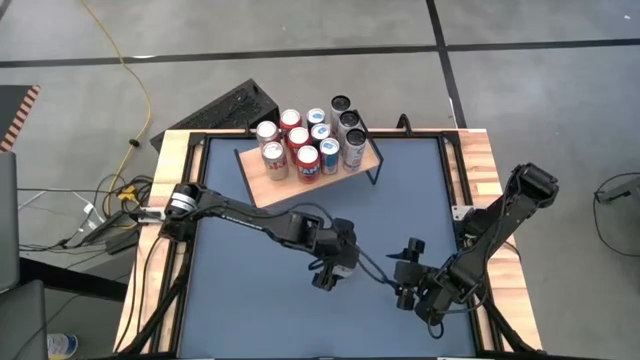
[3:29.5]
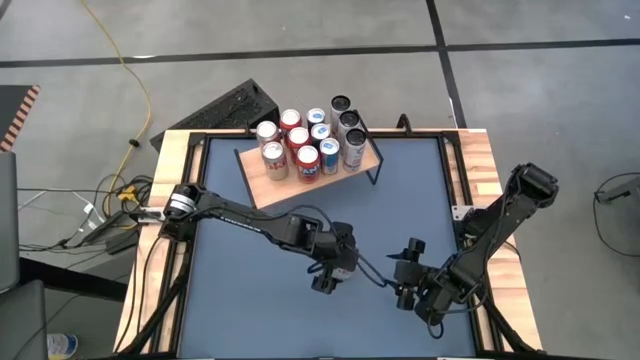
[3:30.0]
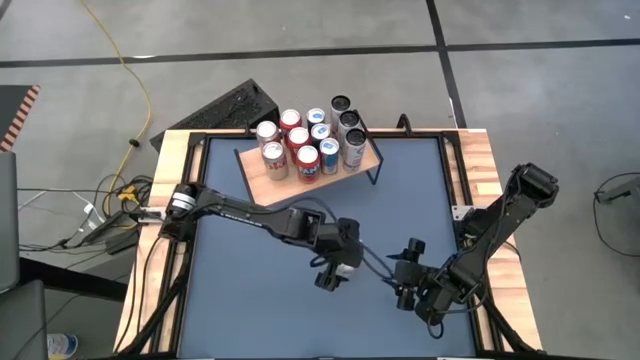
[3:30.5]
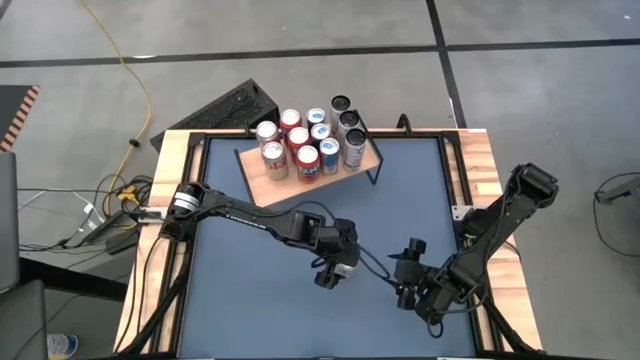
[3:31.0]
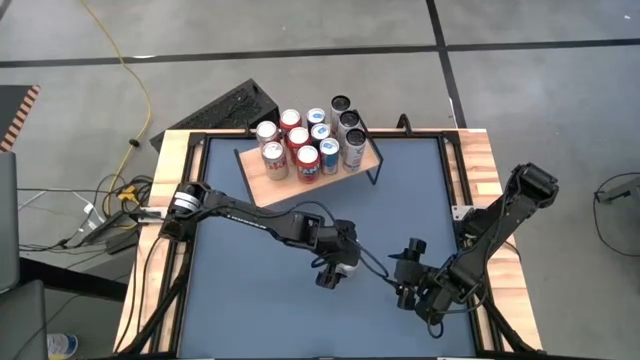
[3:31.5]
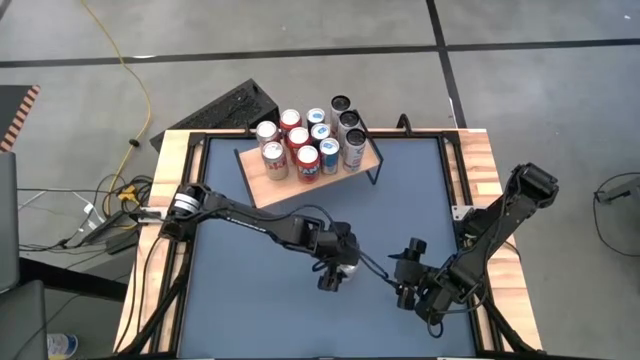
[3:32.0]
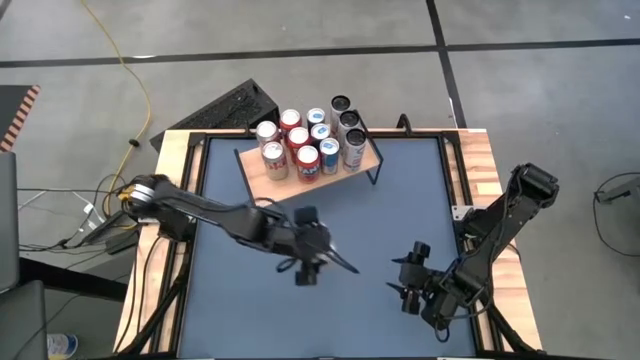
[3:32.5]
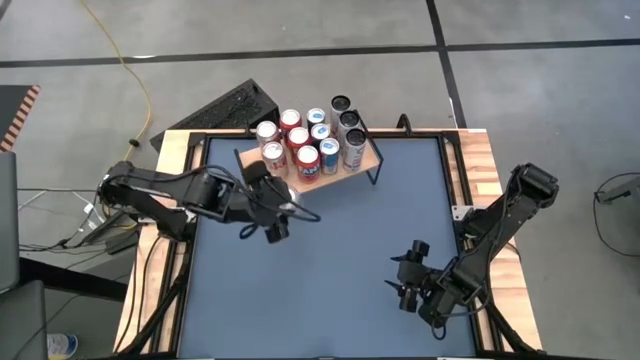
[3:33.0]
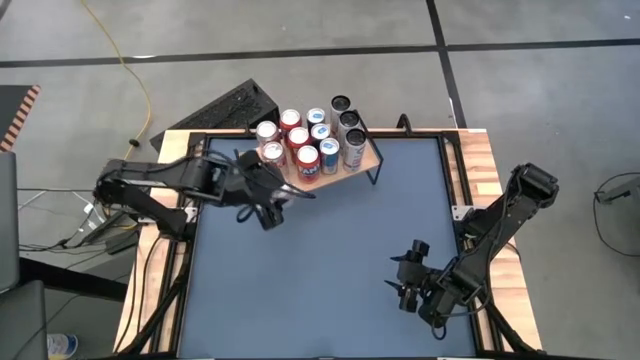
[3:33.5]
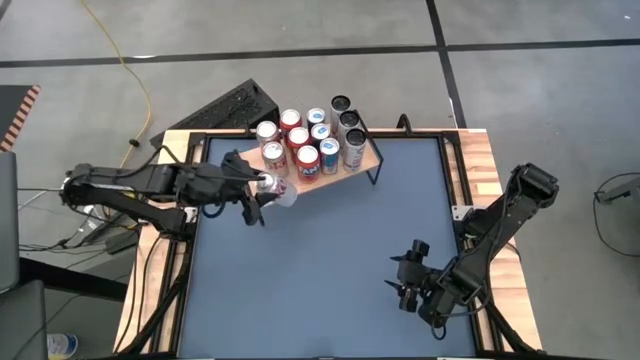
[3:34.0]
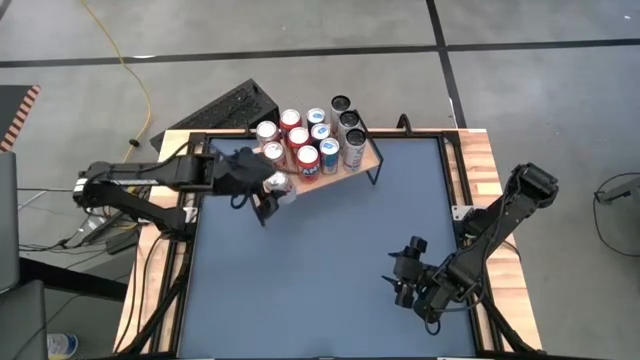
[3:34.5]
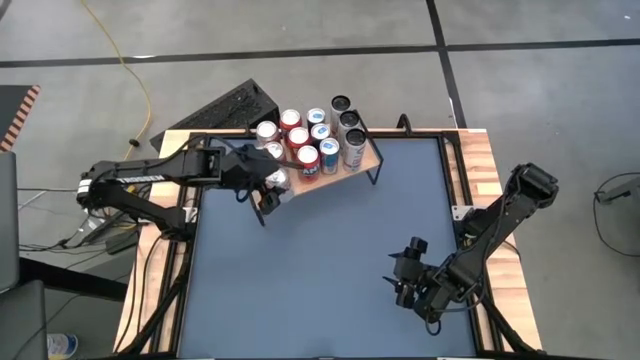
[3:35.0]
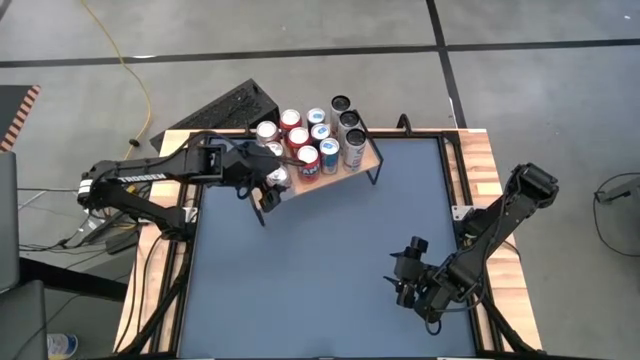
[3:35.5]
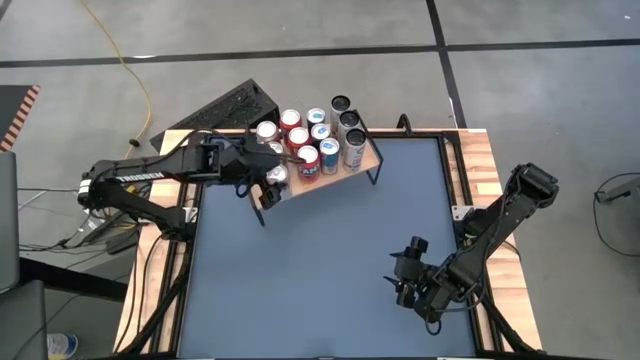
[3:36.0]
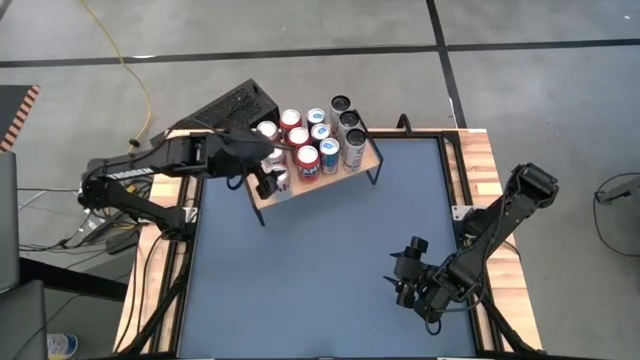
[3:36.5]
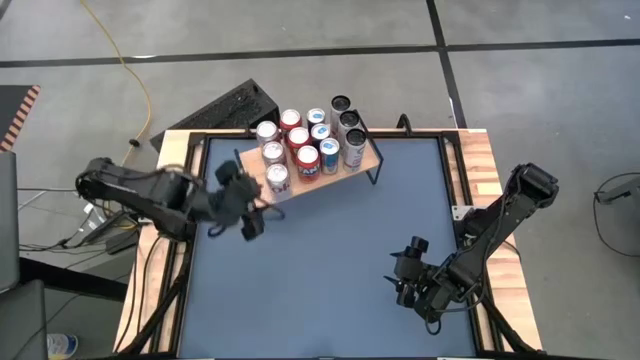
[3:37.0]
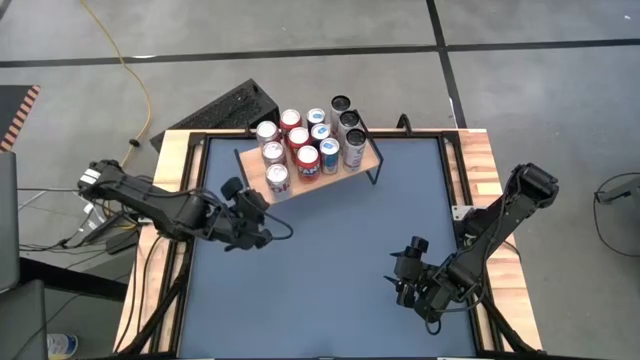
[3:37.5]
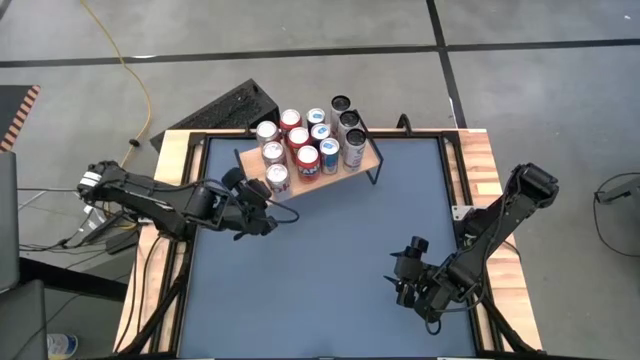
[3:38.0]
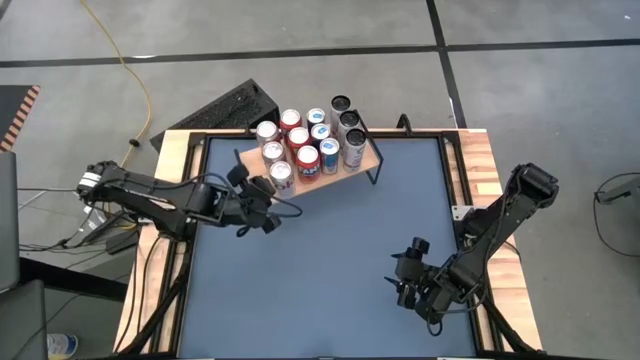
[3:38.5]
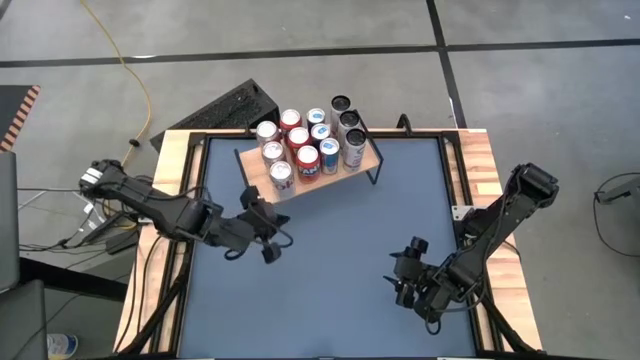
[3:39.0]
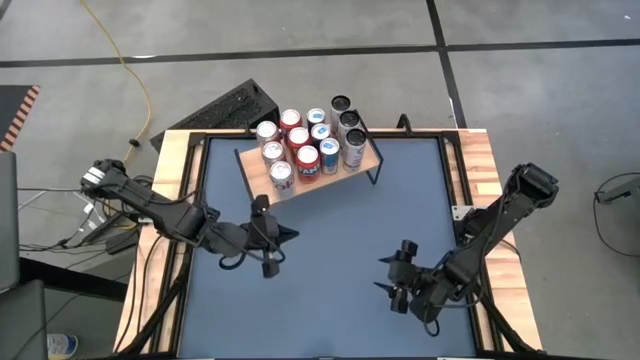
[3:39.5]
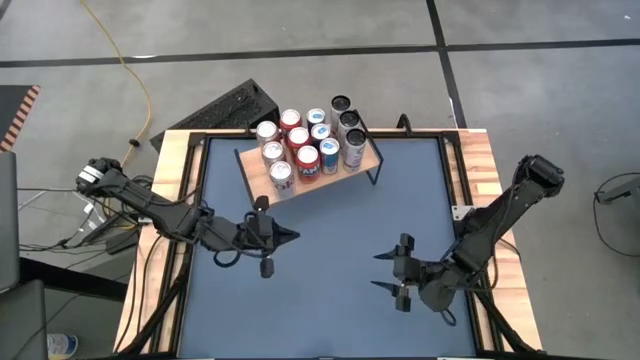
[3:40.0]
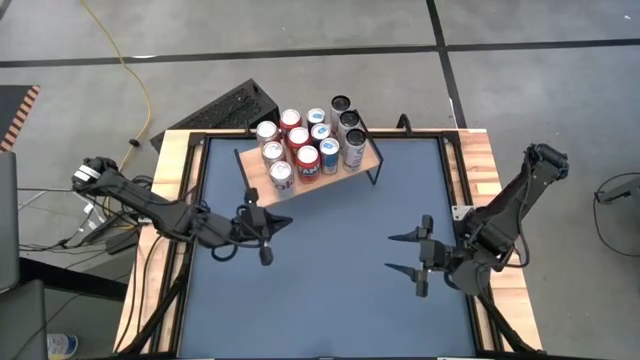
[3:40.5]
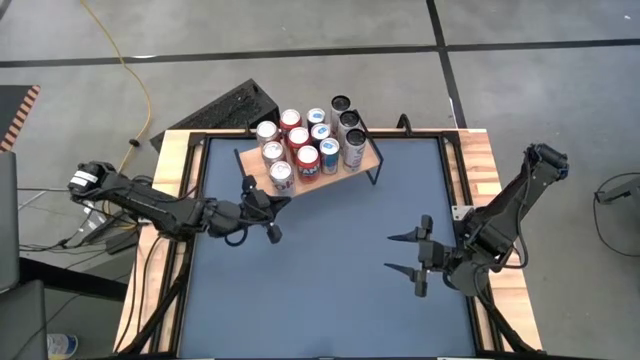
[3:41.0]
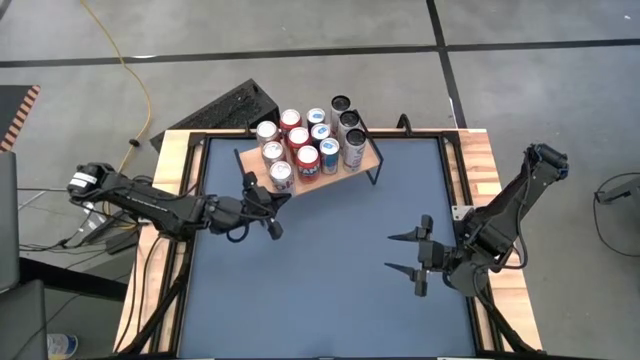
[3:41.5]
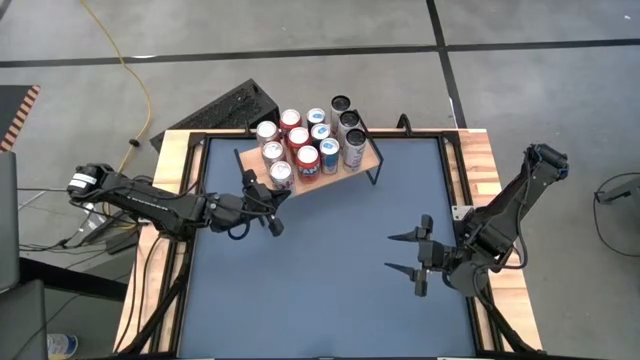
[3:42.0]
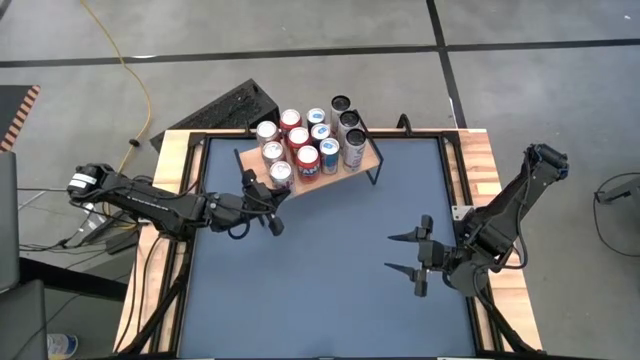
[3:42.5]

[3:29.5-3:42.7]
Task: Place canned beverage on shelf
Put the silver soda can on the shelf aligned with the other silver soda cans

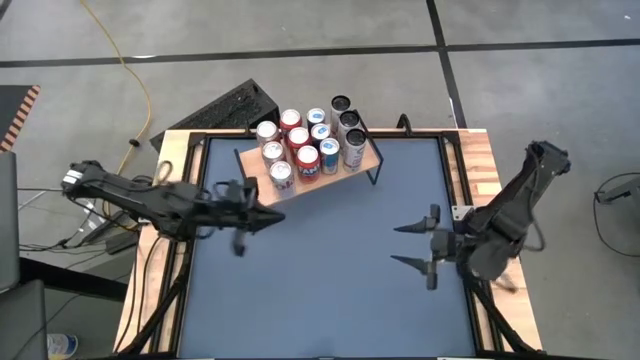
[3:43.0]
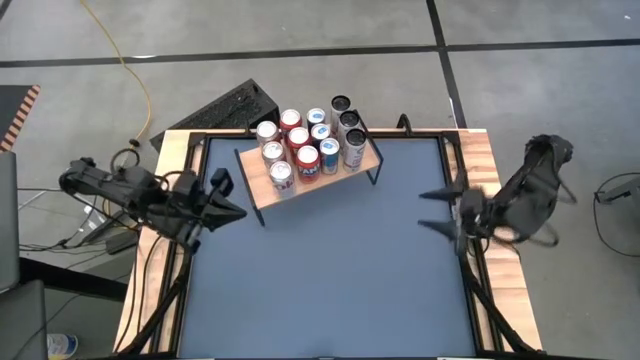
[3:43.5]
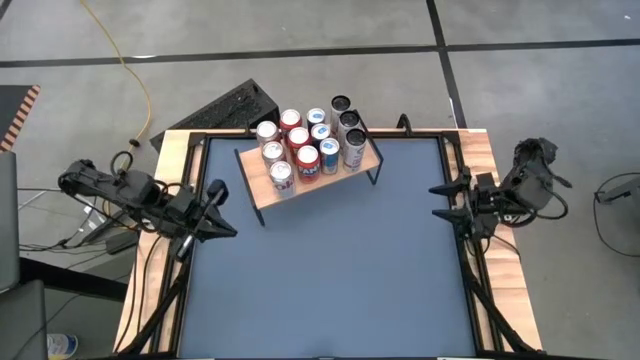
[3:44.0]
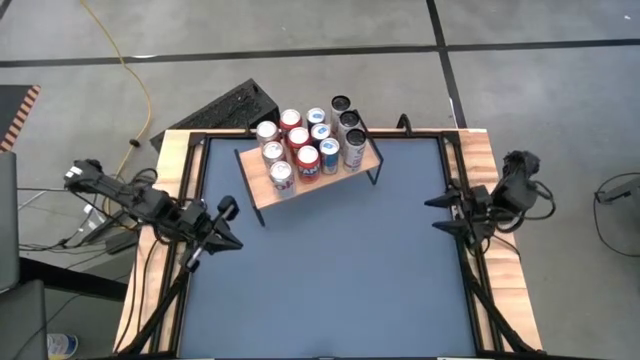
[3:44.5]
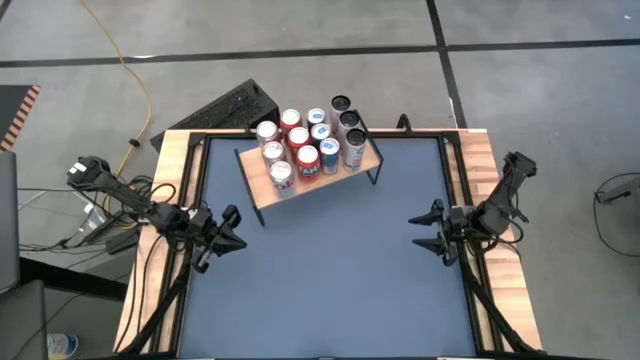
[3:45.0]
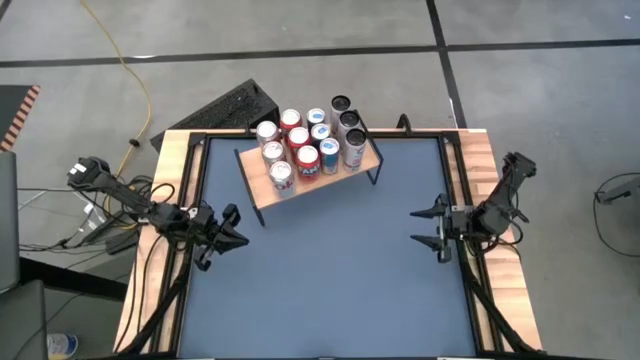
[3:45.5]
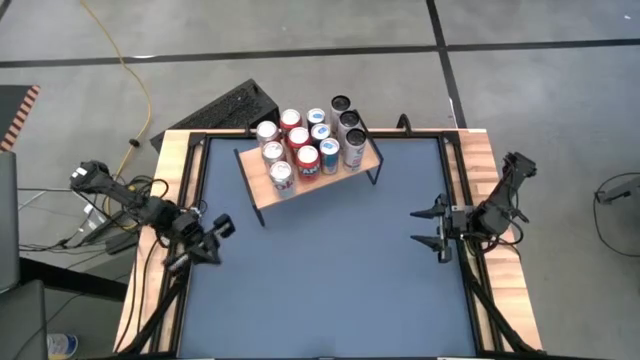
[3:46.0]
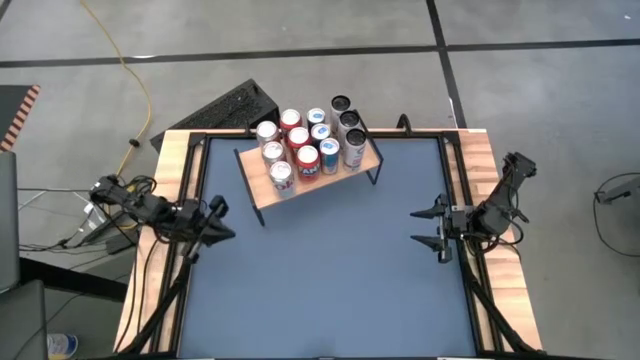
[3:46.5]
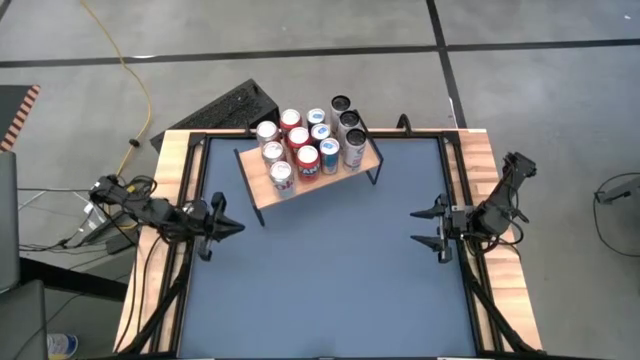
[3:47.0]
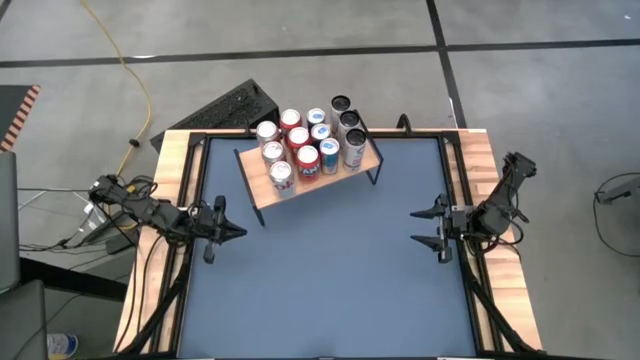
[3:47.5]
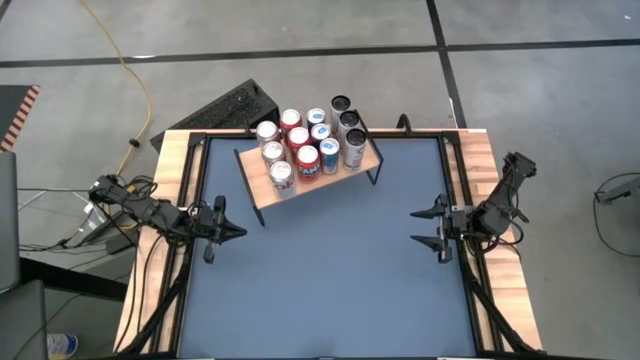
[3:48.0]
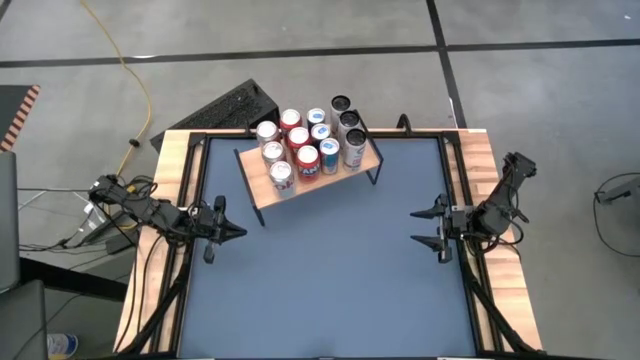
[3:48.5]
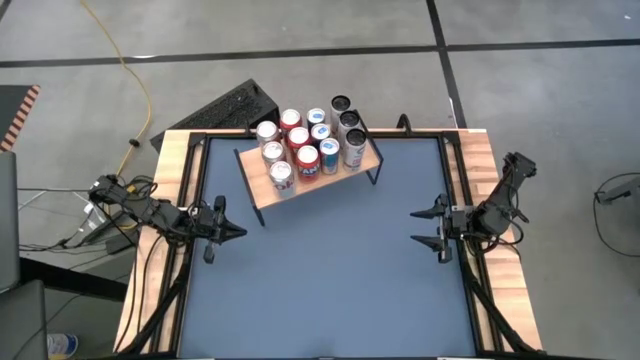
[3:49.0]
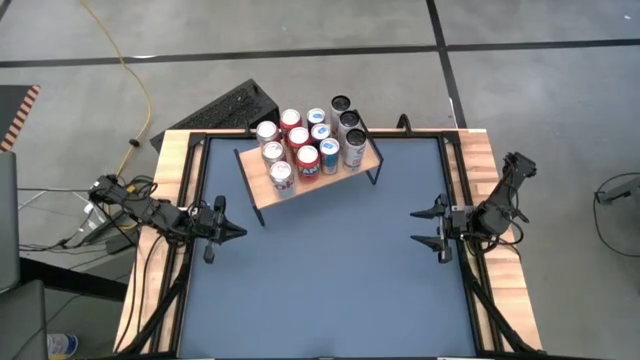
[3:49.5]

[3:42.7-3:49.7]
Return to Home Position
